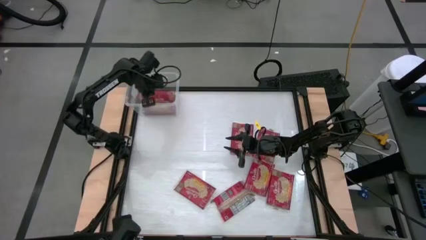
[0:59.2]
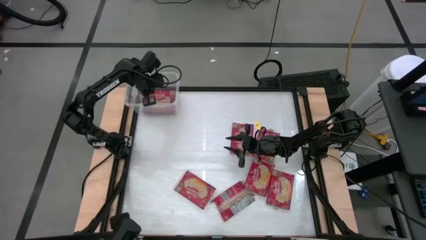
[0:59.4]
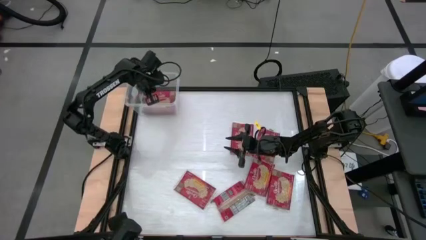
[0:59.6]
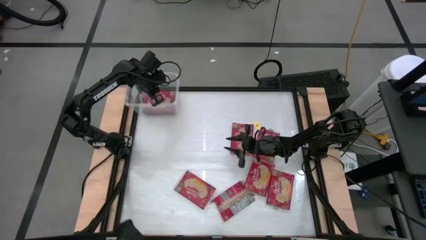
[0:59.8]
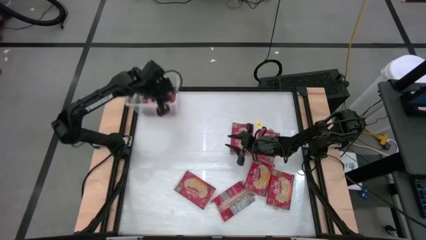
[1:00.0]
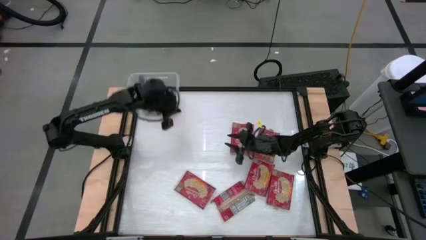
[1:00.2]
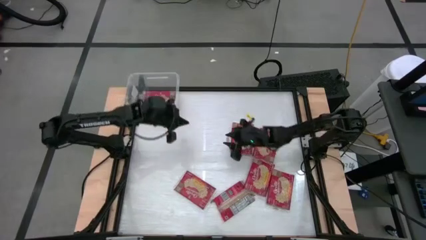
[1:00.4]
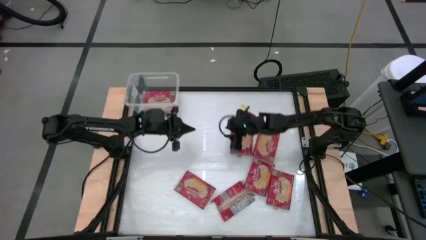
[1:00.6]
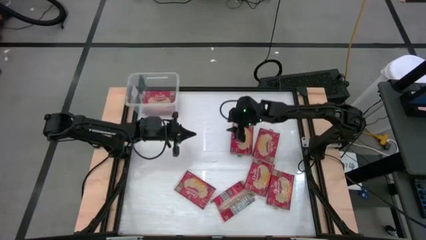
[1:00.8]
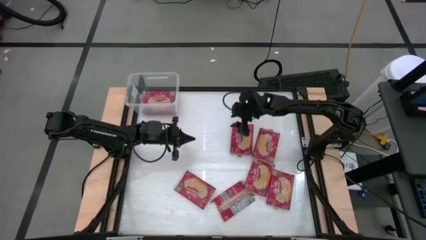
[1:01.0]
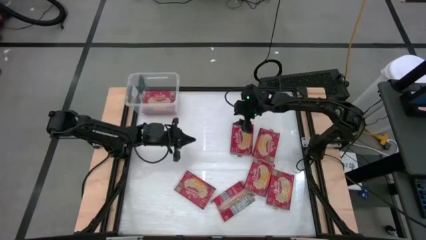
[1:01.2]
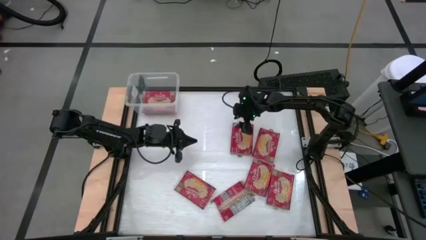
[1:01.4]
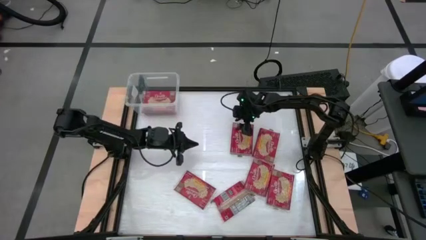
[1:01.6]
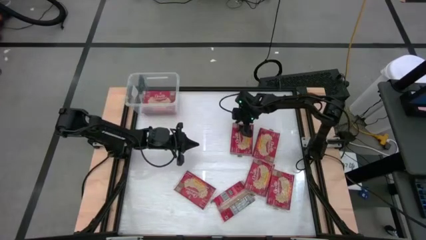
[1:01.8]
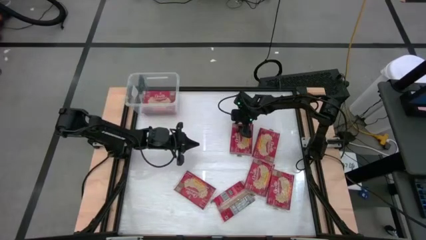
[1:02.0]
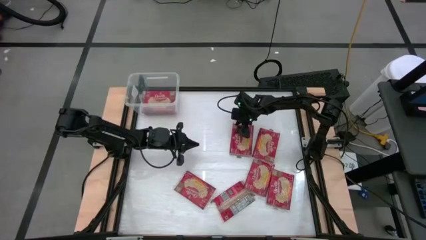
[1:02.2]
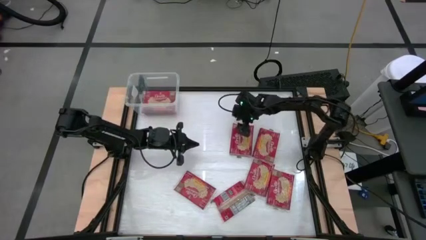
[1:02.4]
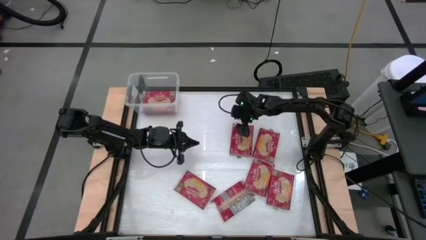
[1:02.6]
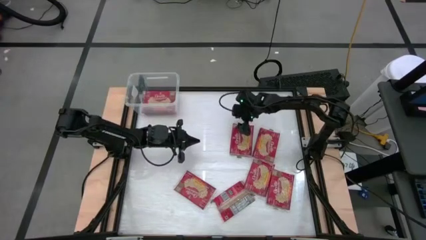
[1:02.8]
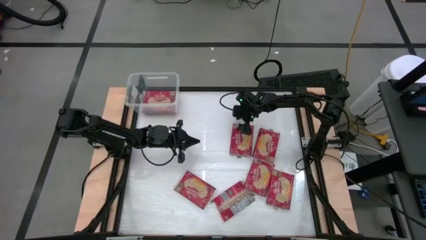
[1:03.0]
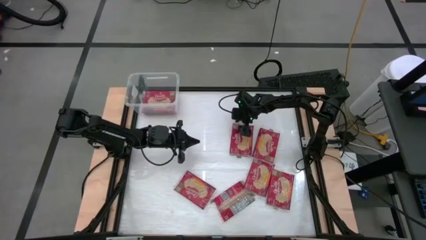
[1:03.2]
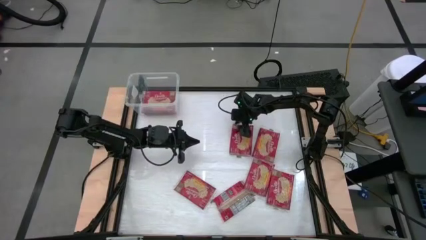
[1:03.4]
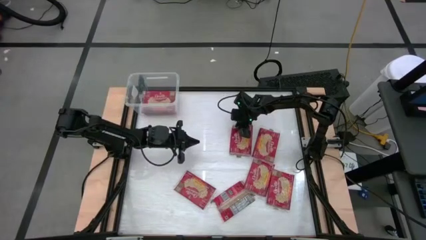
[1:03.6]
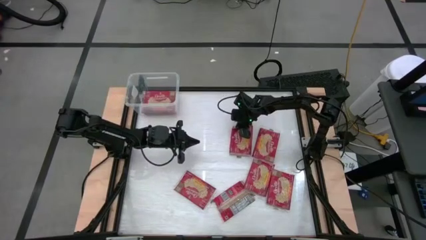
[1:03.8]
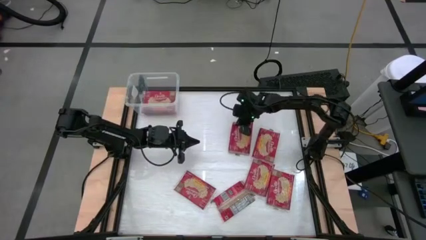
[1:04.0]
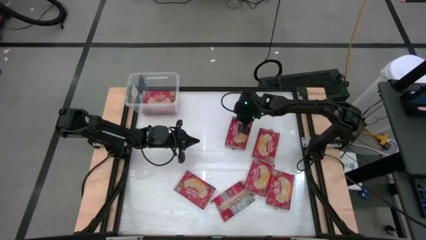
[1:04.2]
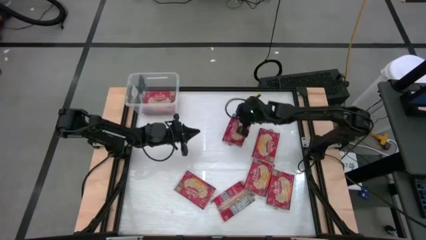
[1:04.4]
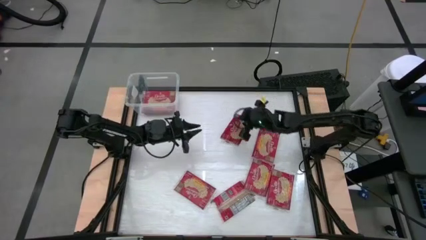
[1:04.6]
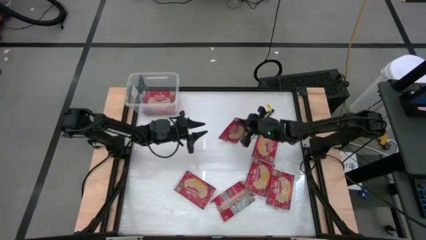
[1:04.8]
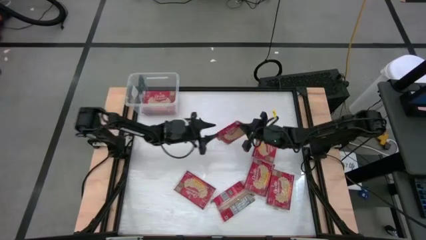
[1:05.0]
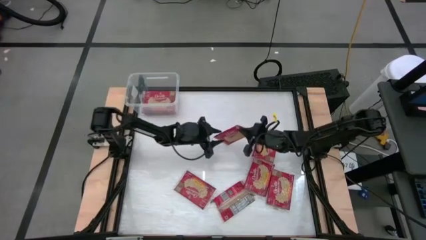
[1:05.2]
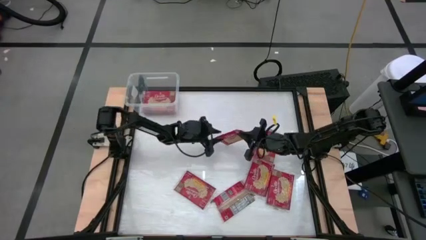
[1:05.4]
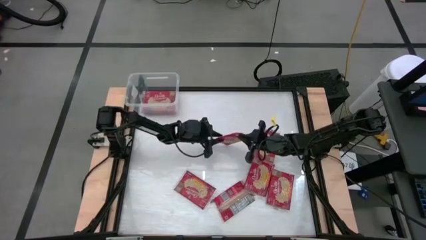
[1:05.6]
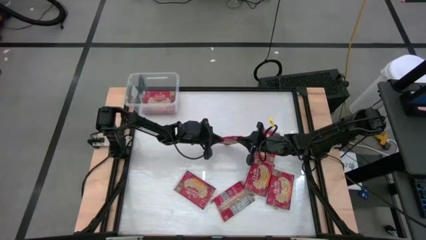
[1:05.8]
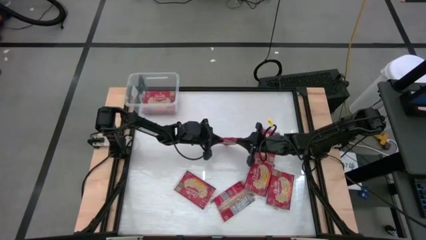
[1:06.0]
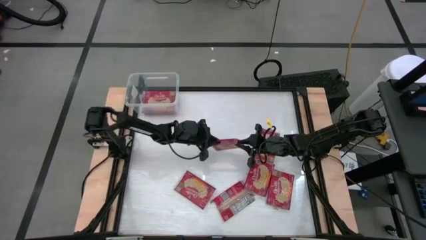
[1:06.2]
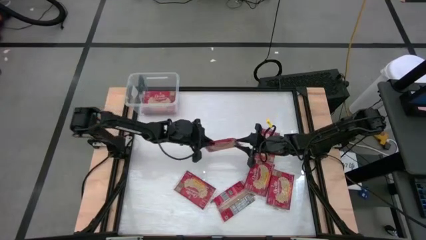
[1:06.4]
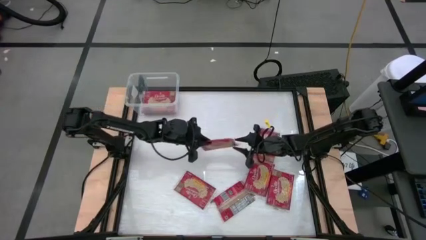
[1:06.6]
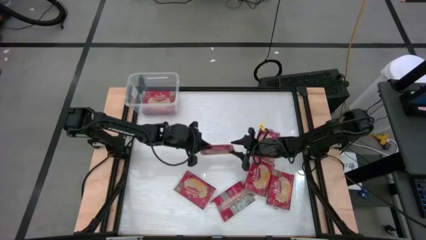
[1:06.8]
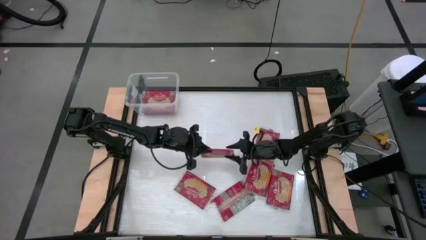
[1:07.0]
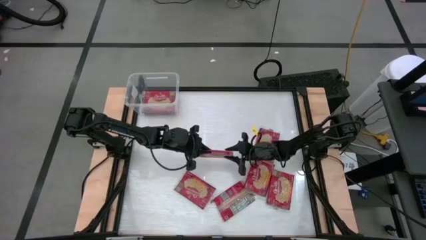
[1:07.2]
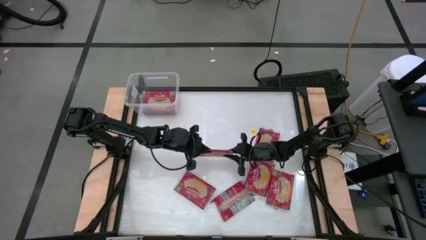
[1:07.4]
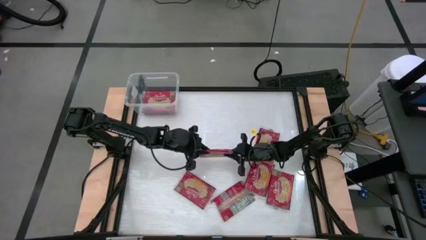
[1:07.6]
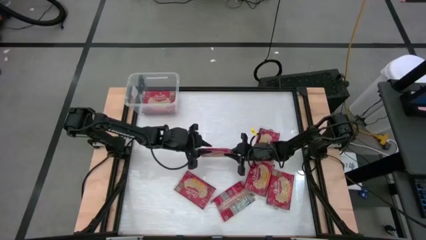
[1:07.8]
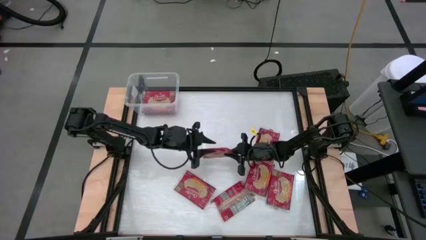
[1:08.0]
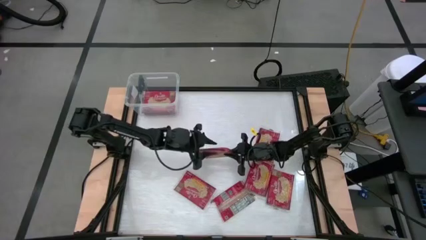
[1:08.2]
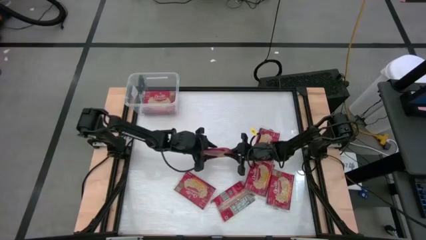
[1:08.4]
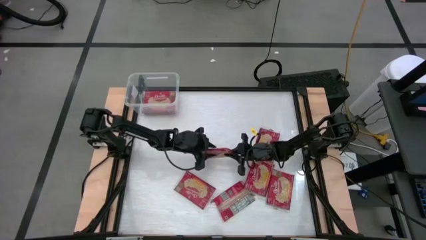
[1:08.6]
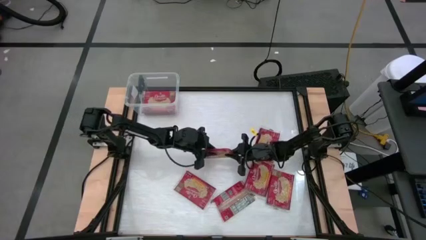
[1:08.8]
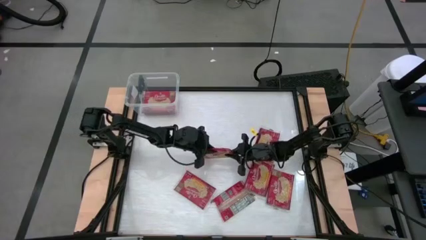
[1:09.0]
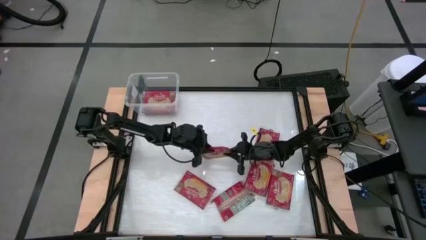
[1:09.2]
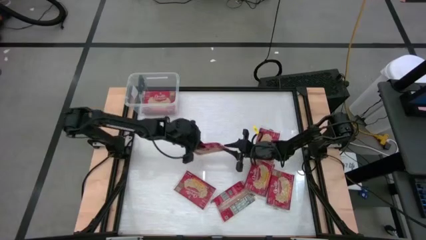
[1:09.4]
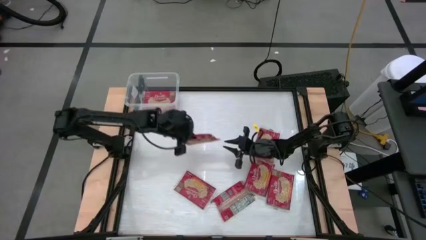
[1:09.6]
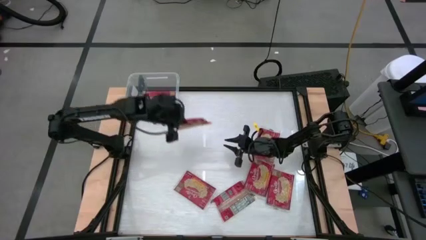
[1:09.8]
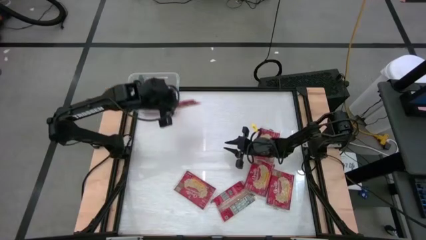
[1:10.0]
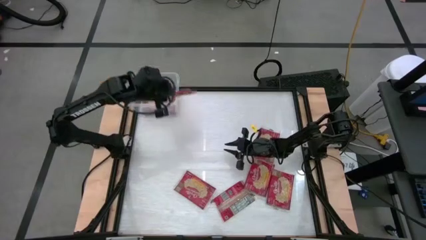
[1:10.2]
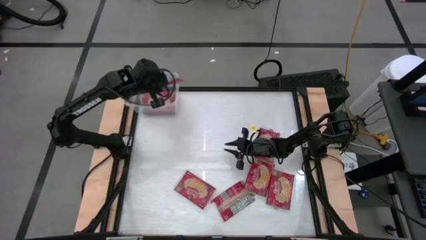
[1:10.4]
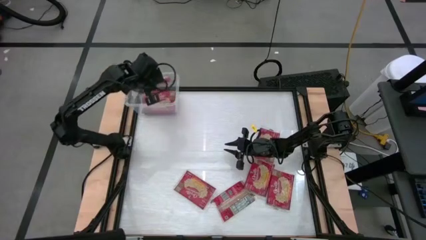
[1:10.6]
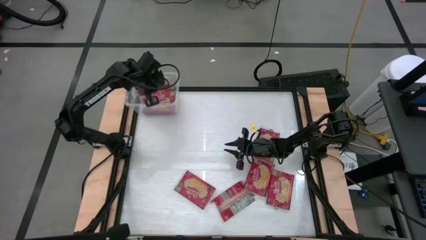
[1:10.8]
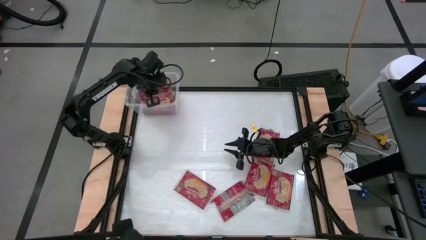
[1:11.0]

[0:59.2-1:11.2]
Task: Sort popcorn bags into baskets
Put the red popcorn bag into the transparent container

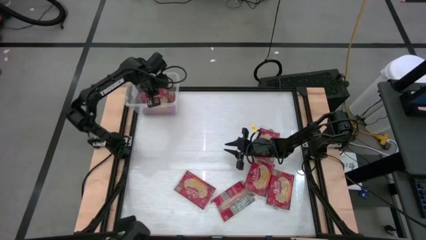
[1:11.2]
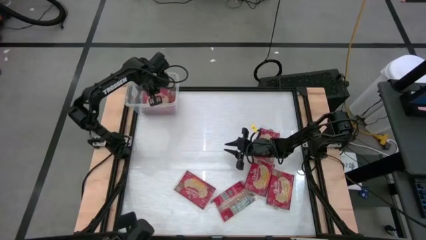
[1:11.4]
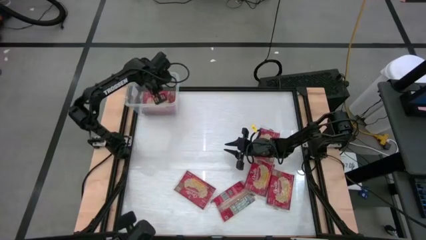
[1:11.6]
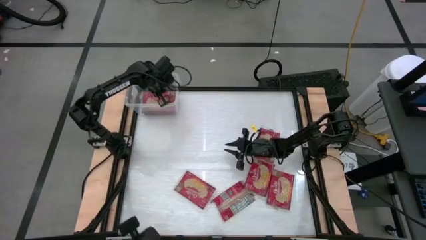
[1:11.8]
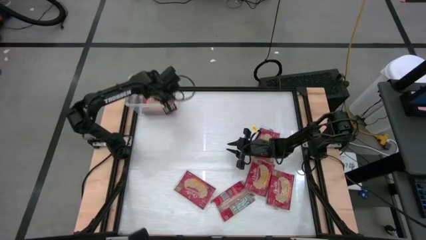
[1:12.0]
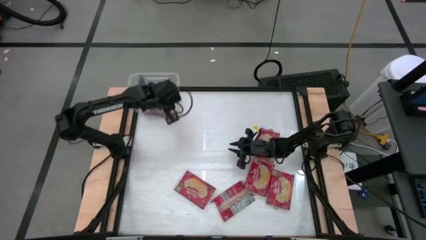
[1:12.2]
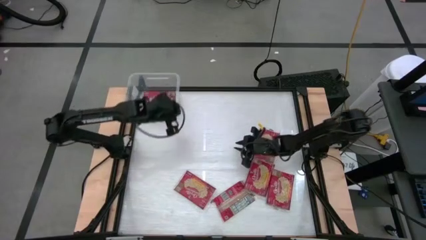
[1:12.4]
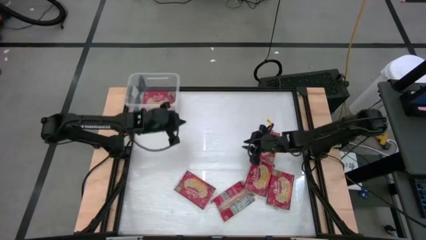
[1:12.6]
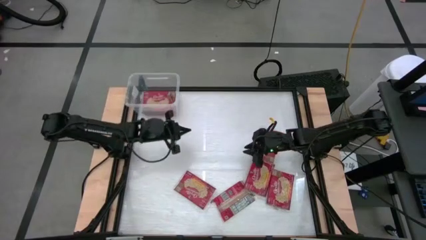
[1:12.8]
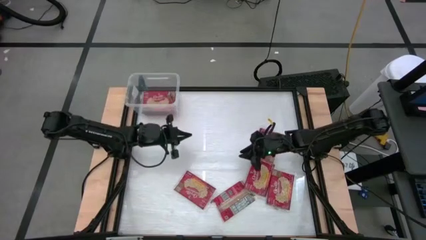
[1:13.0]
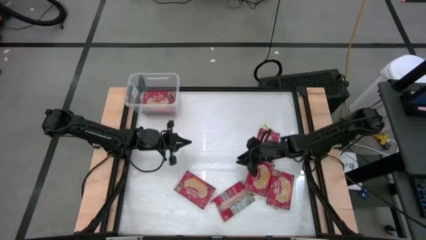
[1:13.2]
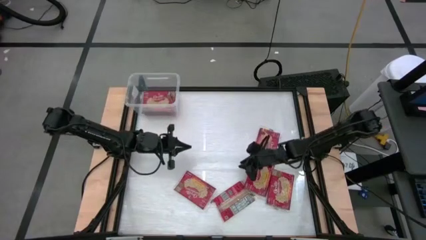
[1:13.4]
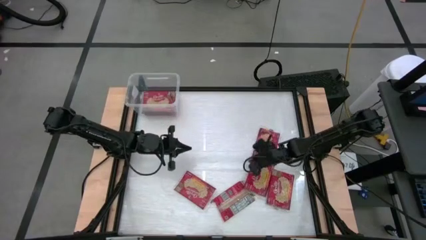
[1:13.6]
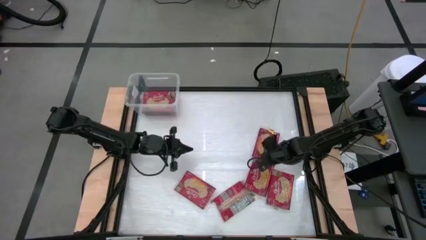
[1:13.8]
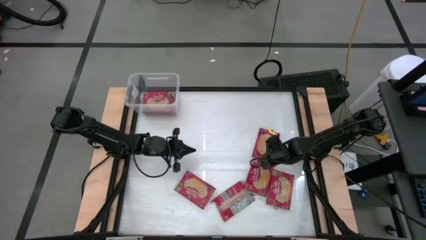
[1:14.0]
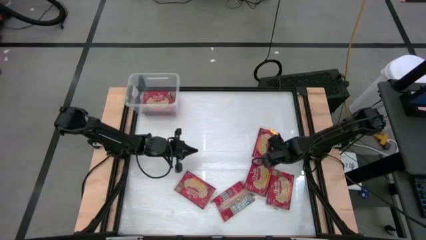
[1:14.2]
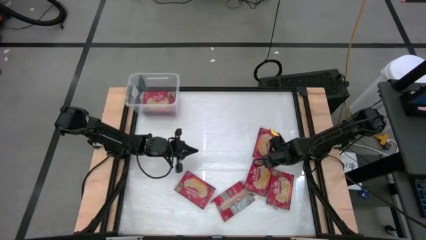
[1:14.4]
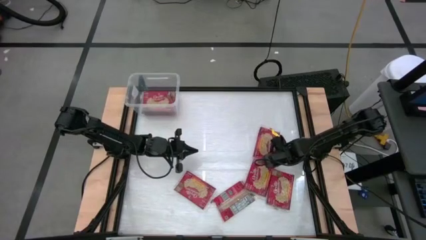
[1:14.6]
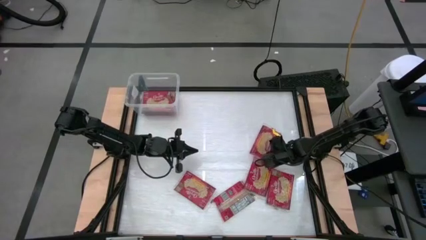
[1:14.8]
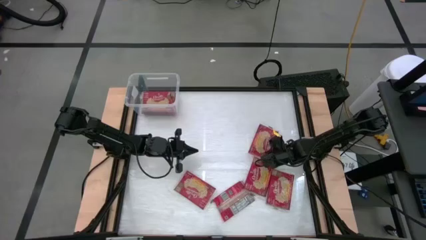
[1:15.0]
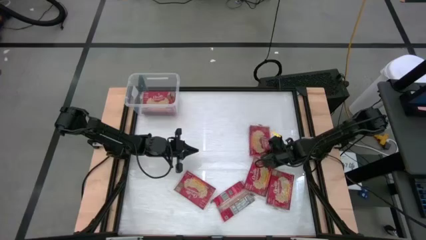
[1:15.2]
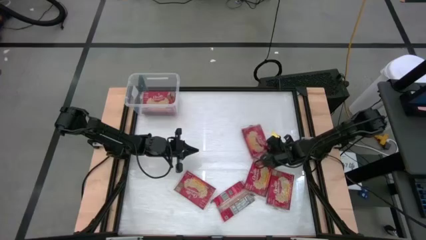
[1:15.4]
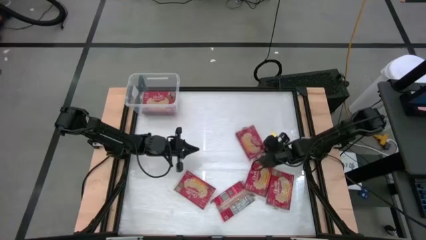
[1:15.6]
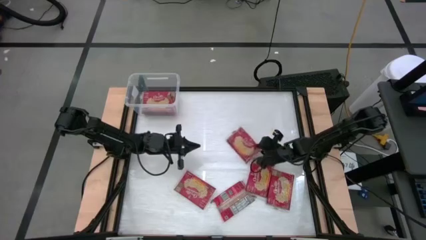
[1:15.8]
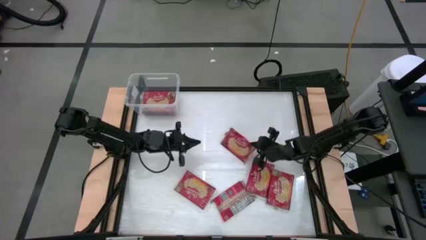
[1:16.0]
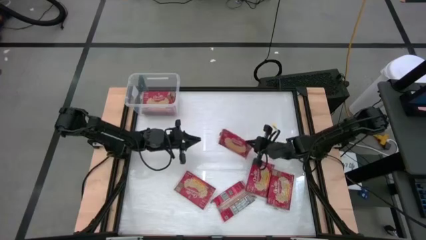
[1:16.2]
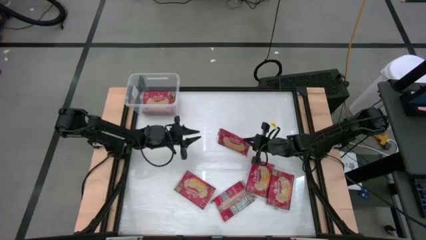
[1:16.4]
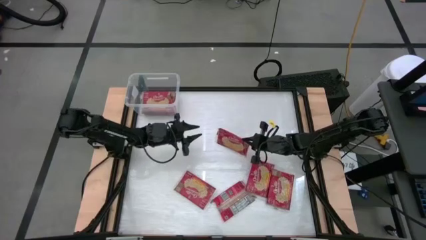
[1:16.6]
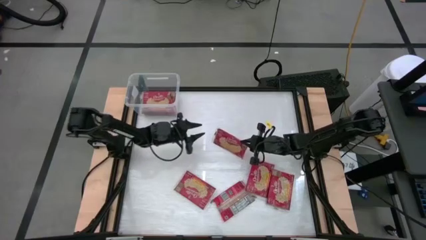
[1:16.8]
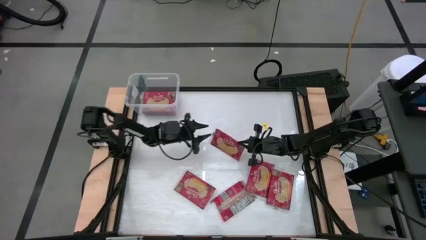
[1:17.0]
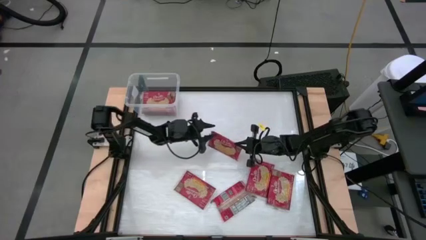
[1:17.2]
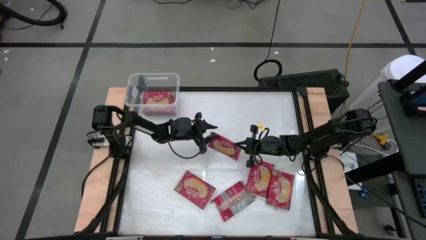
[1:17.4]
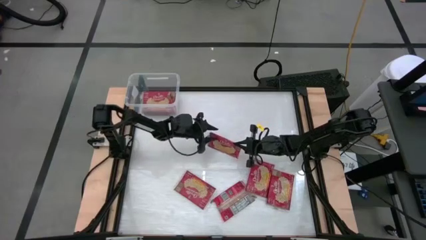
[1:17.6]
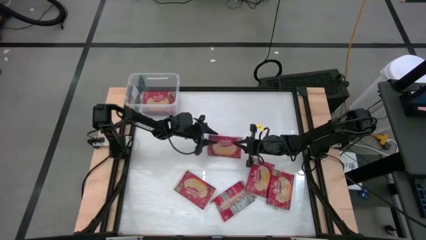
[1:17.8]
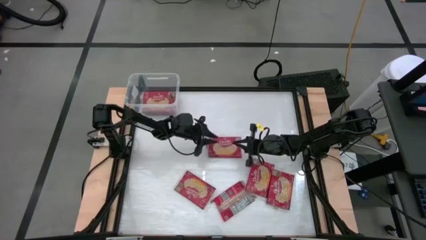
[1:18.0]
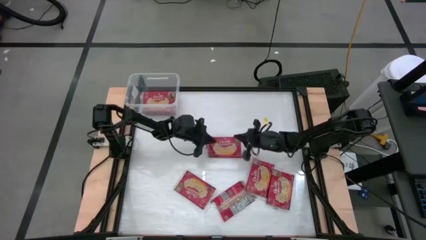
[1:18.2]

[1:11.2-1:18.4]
Put the red popcorn bag into the transparent container
